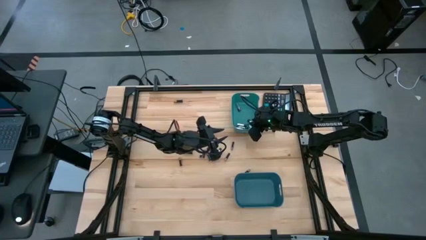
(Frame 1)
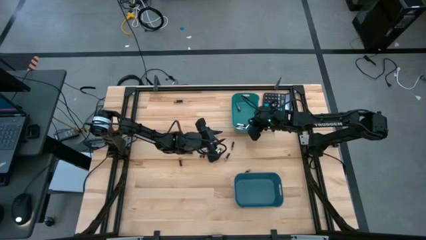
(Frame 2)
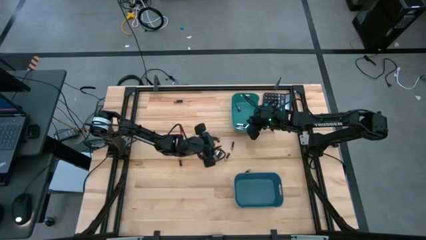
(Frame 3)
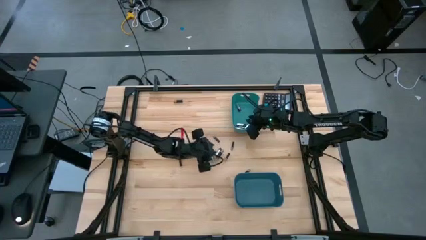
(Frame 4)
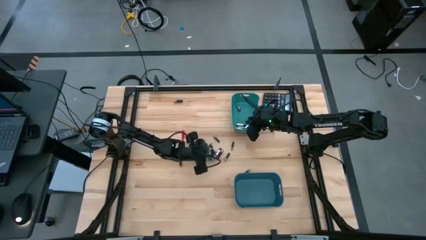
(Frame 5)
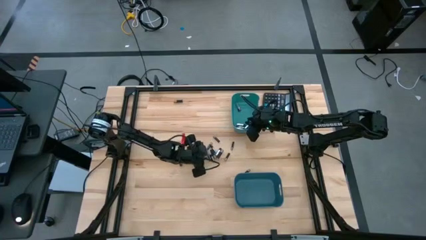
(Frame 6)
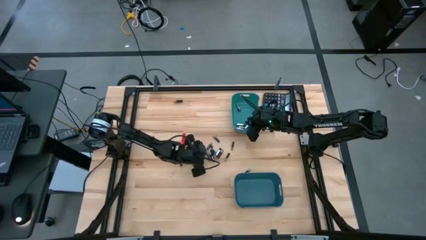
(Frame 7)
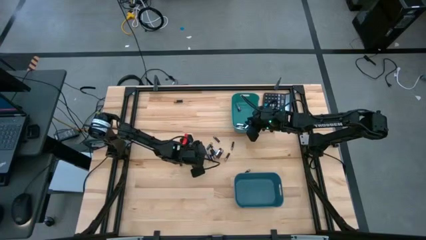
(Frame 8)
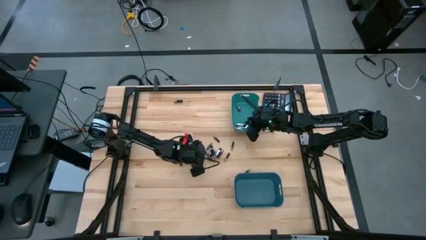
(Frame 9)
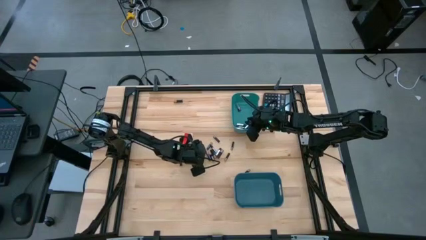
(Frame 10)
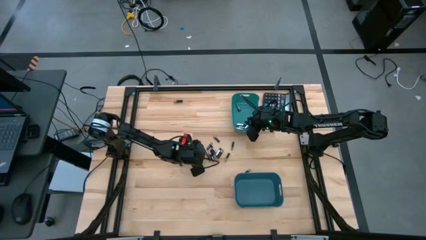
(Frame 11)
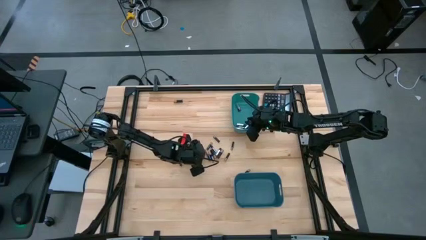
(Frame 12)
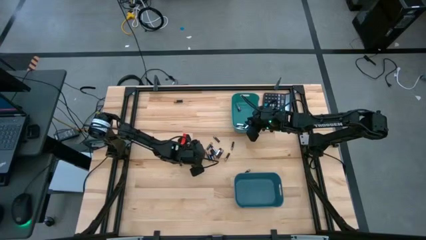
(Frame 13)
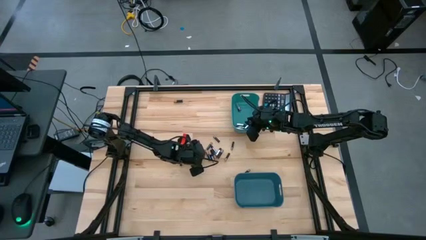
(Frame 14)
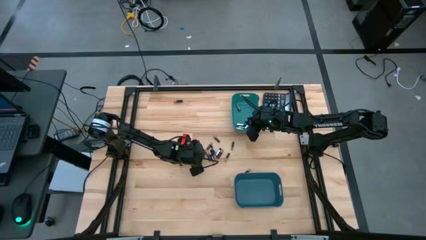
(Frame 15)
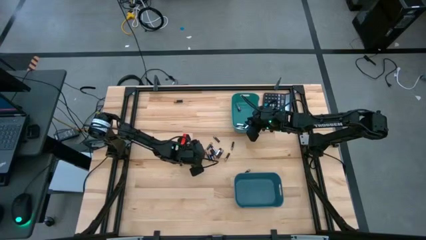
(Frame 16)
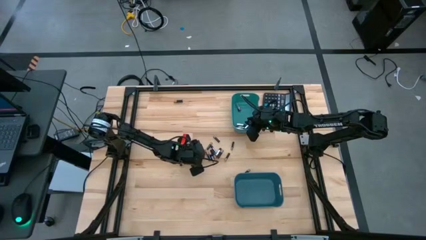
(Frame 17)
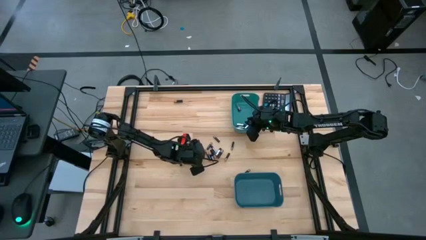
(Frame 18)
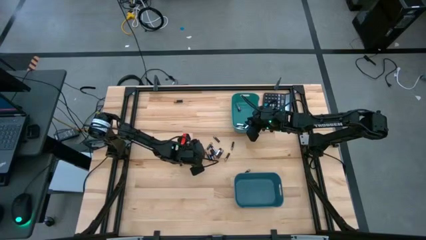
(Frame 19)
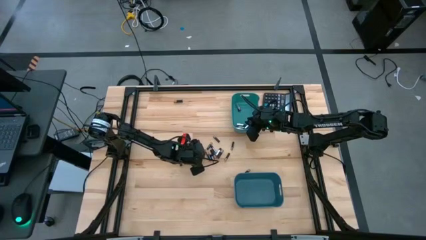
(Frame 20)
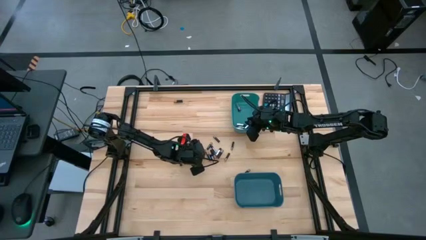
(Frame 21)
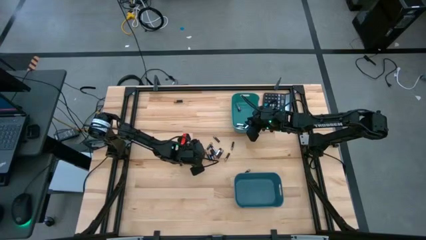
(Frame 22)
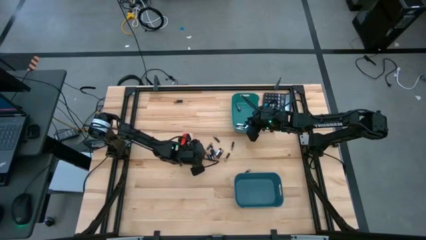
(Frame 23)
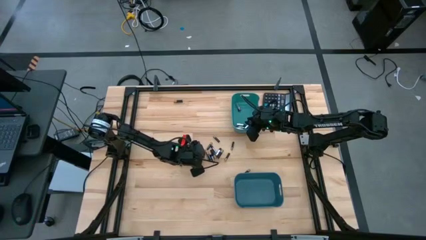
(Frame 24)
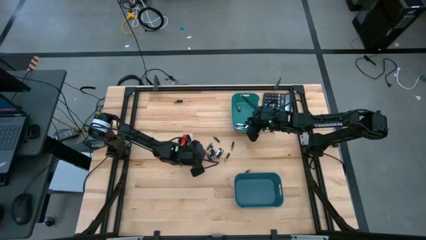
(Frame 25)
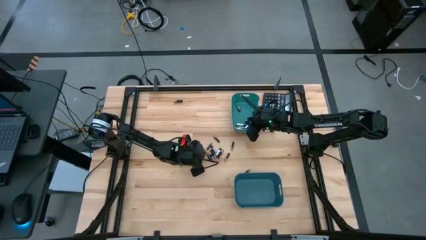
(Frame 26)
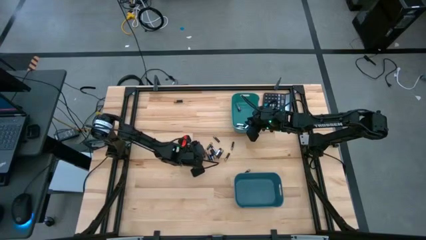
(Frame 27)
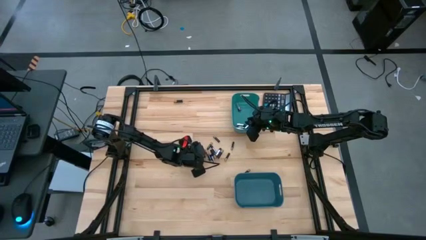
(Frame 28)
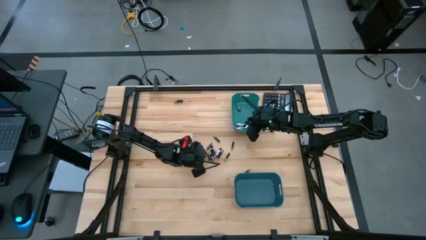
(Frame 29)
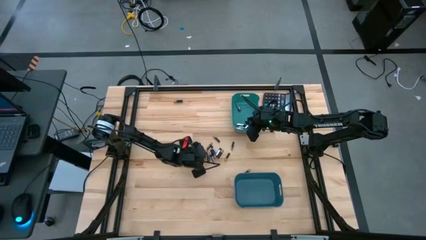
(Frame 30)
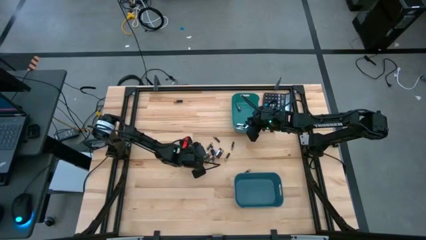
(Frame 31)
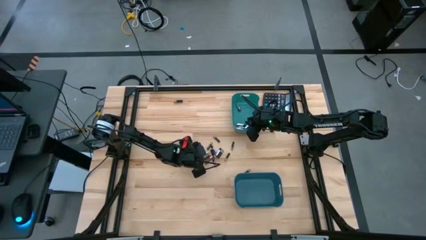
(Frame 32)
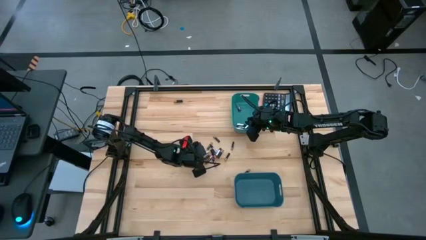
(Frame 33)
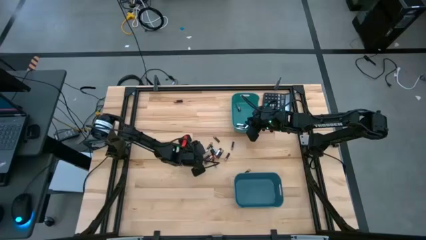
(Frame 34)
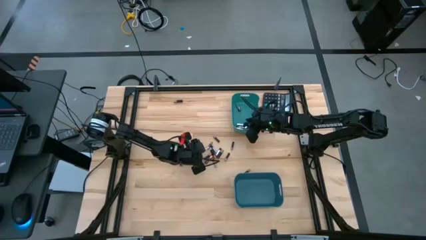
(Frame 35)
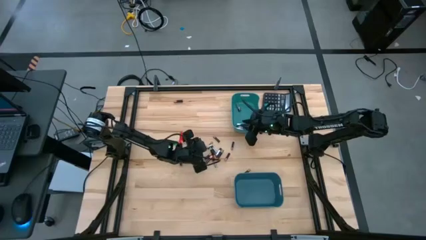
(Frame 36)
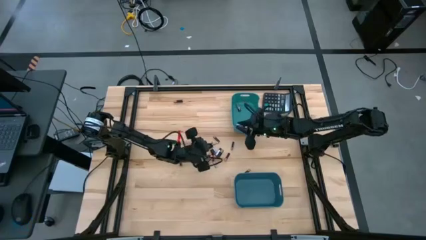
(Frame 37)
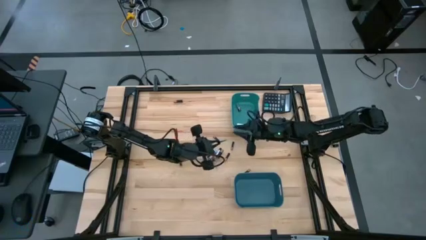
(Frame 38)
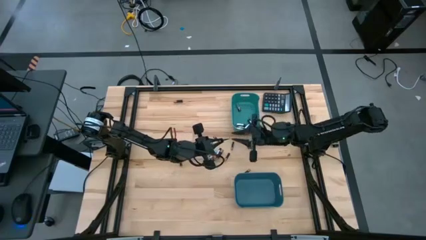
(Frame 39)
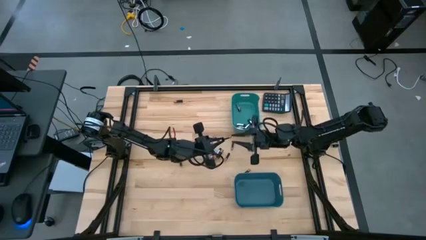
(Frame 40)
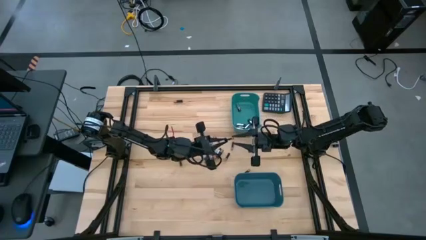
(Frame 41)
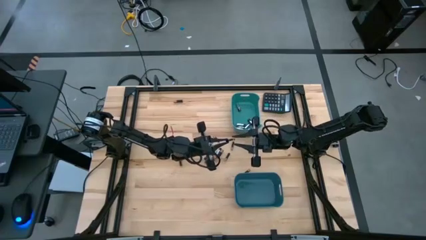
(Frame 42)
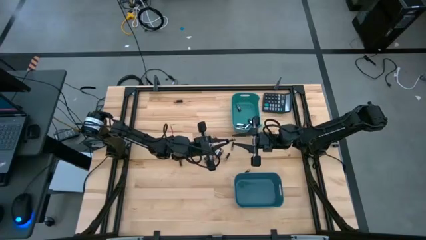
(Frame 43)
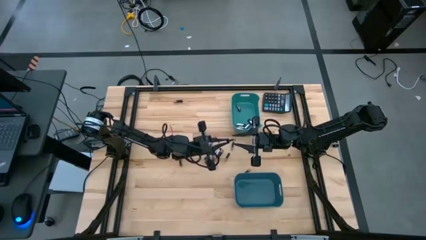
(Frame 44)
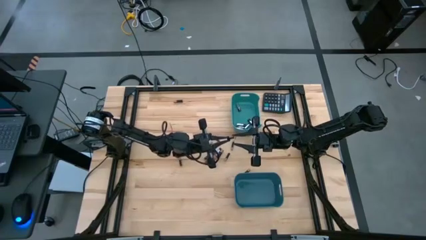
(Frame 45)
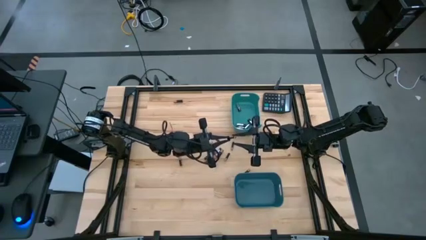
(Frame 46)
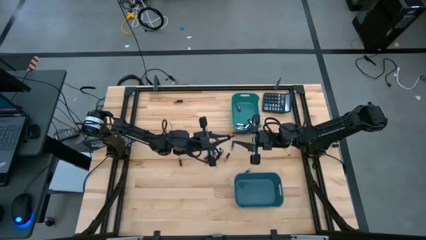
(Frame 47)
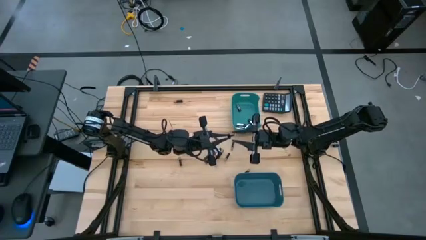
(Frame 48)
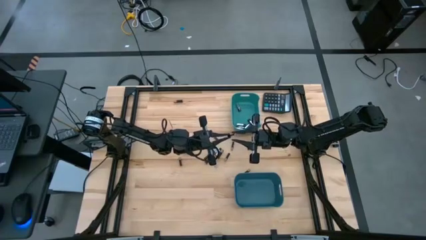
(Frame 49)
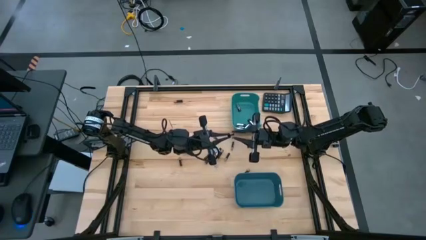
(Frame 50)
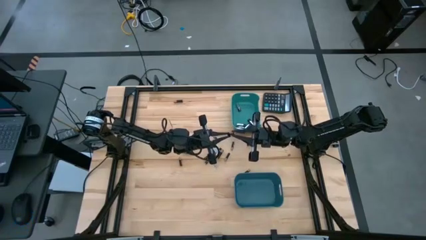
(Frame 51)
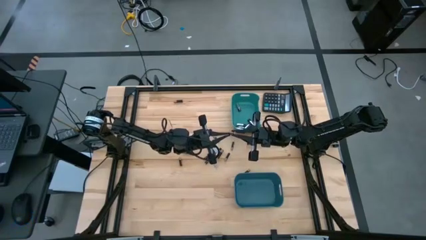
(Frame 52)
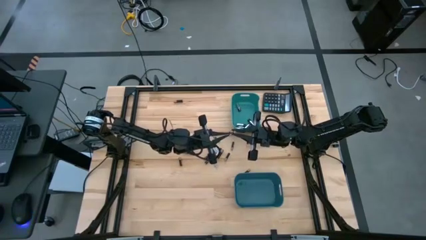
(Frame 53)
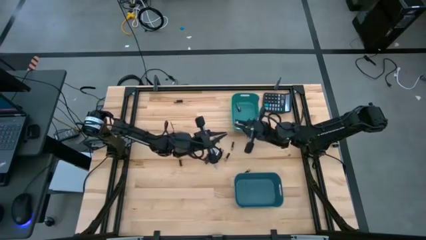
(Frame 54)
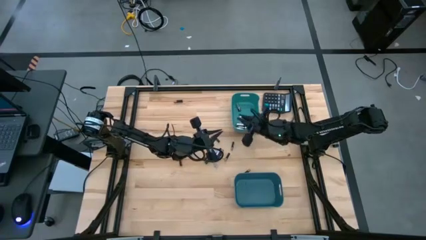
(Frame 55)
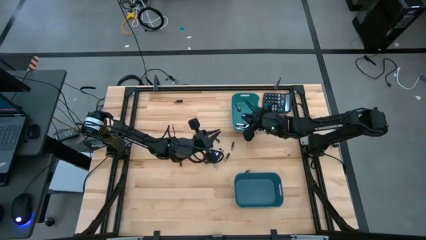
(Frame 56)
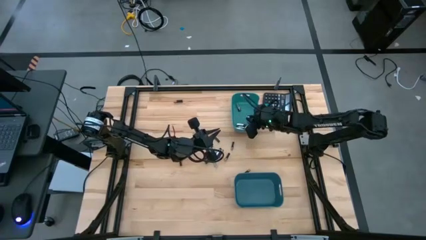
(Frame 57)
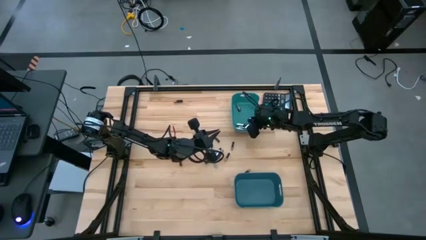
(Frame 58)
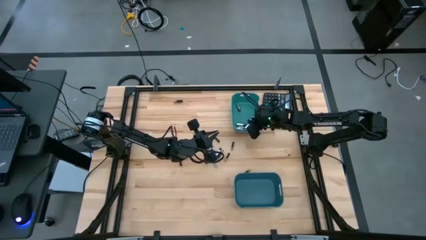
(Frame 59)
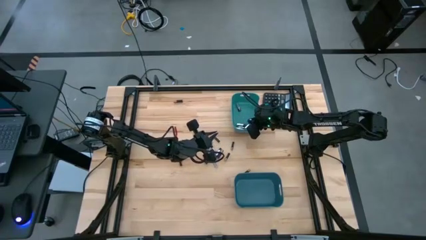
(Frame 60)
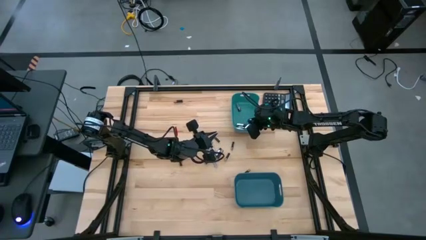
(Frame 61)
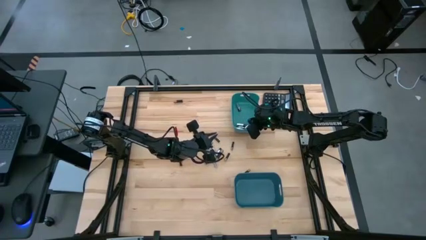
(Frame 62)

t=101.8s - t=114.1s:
Task: Sort batteries
Put the silver battery into the green bin

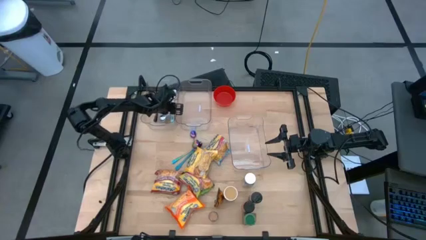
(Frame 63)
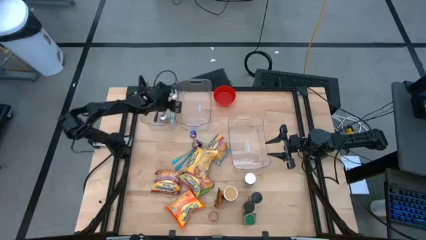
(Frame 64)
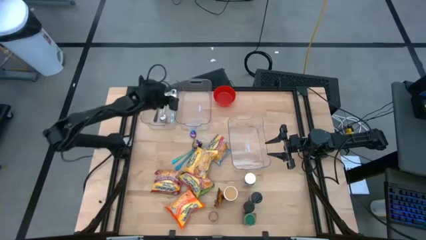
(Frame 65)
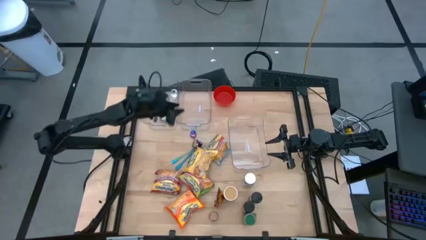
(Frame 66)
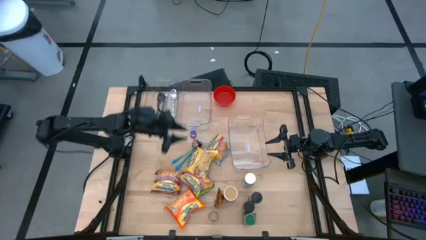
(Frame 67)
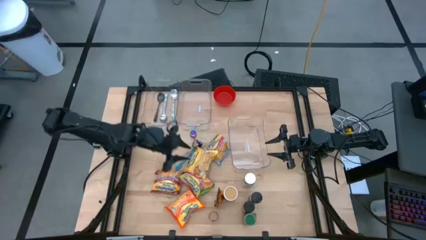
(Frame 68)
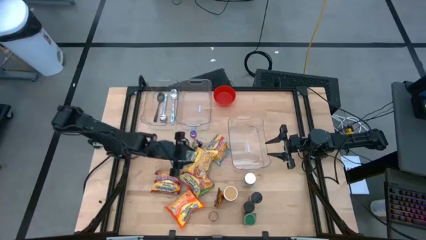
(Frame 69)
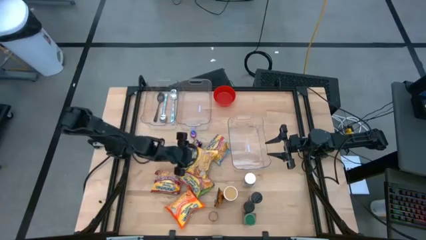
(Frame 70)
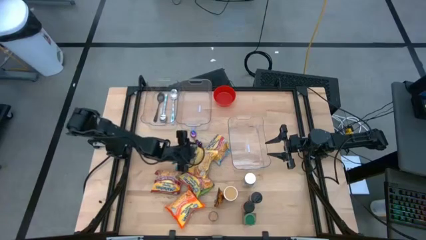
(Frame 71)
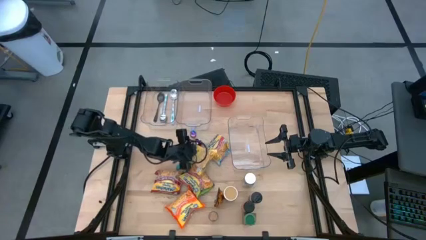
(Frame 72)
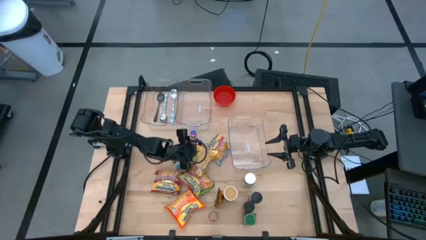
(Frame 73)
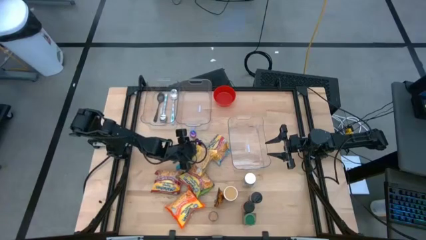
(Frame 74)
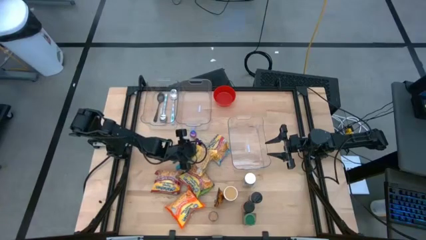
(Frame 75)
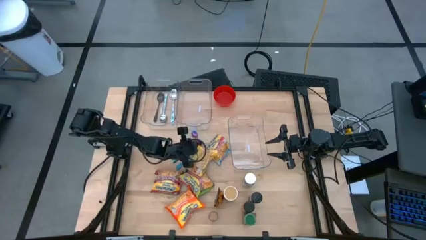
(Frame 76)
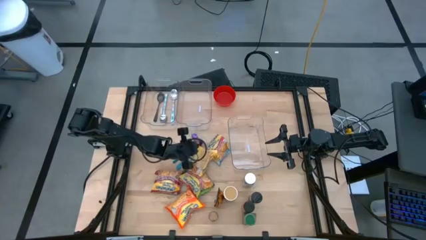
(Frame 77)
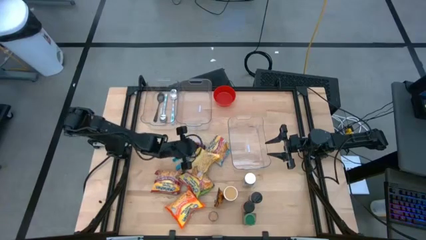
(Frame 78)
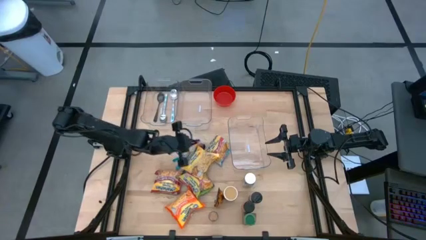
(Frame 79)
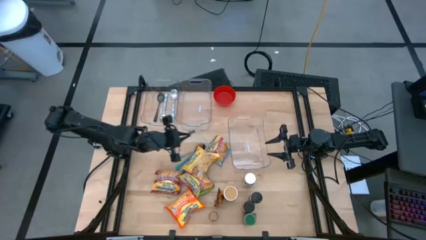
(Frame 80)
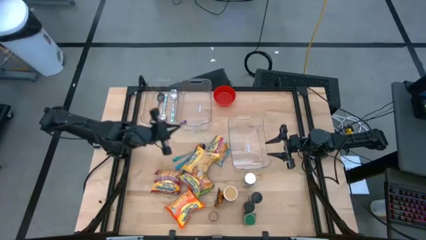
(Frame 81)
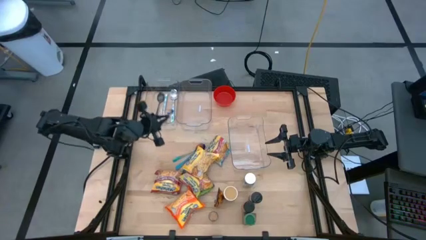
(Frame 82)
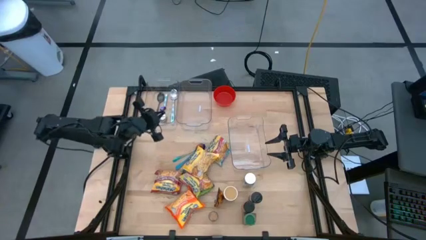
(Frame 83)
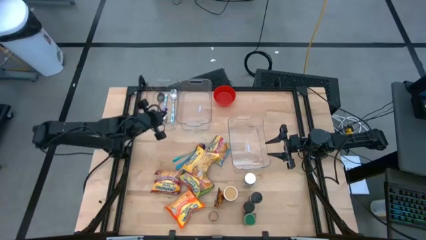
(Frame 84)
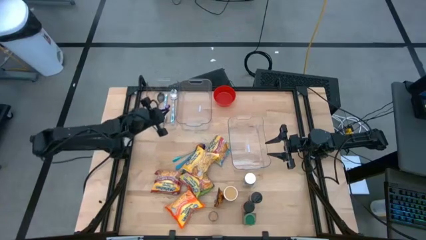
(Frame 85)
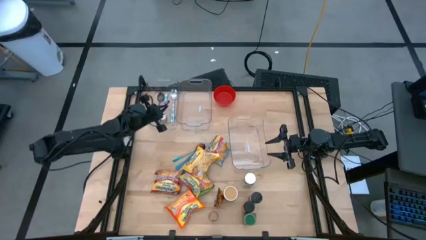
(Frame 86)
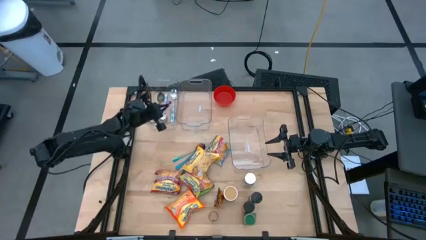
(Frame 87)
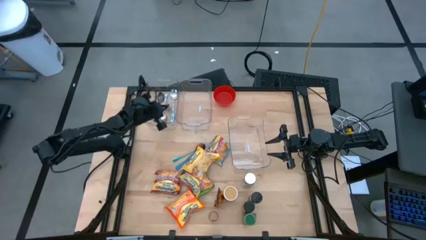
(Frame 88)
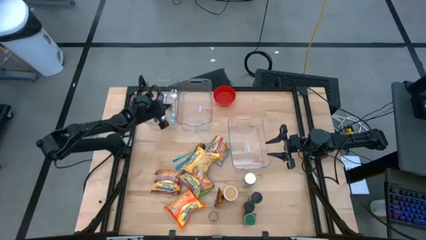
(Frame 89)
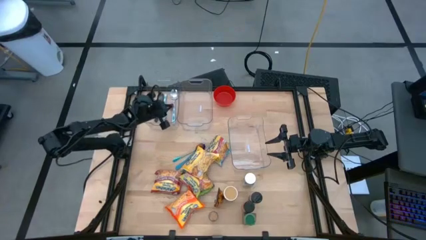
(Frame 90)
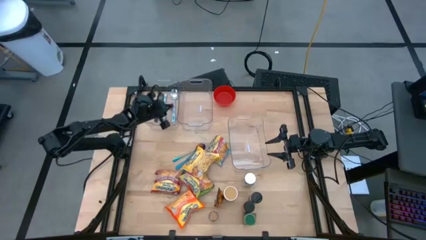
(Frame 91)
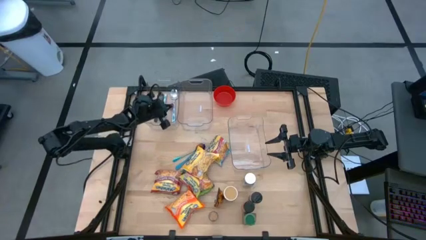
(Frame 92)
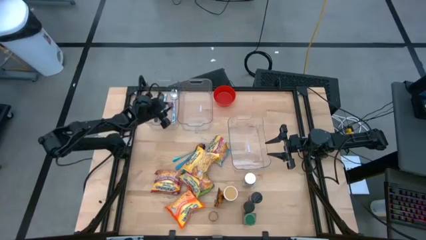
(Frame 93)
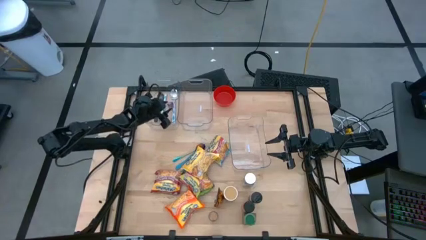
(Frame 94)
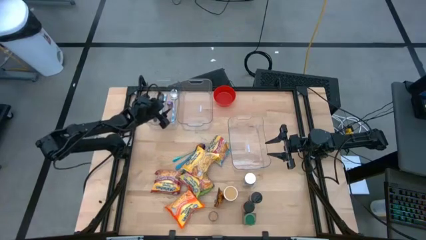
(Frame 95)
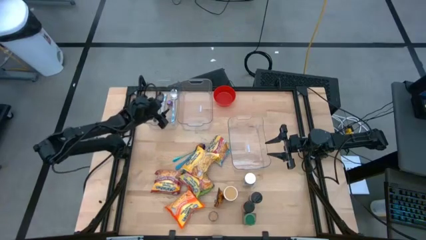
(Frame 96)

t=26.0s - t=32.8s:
Task: Pick & Place Food Item
Put the top violet spoon into the top left transparent bin
